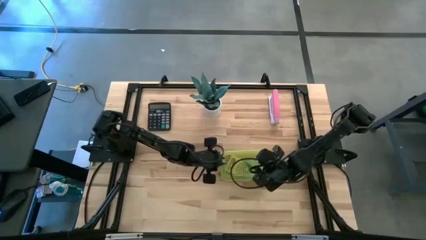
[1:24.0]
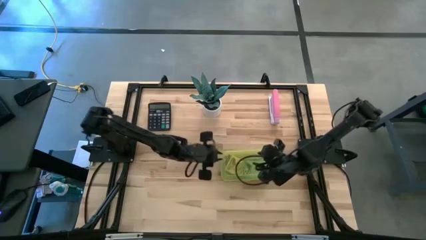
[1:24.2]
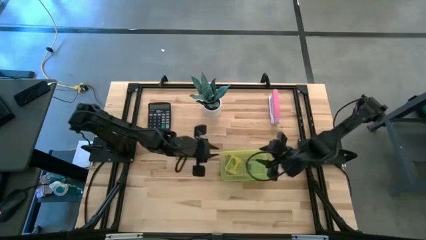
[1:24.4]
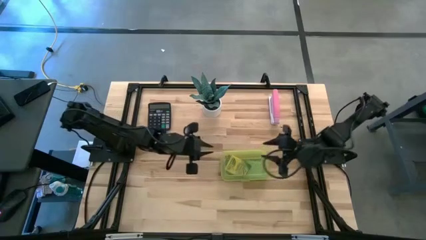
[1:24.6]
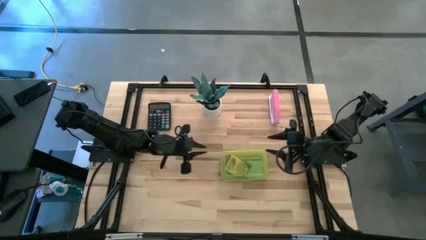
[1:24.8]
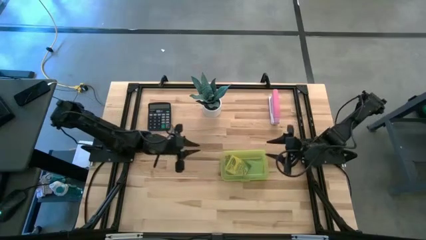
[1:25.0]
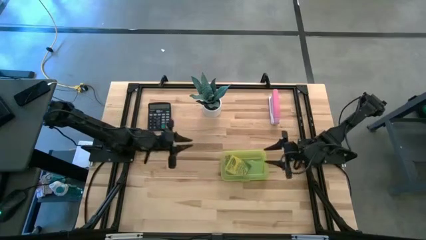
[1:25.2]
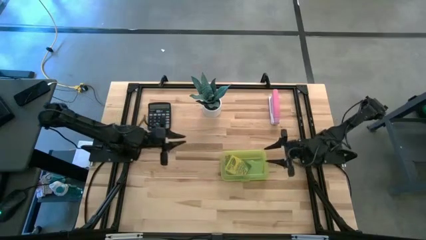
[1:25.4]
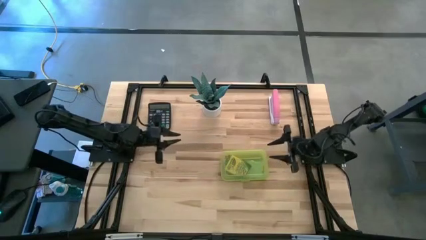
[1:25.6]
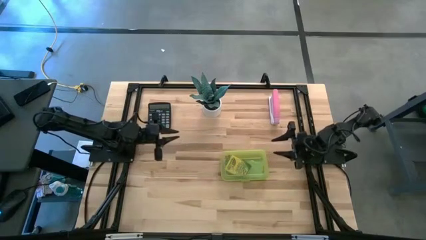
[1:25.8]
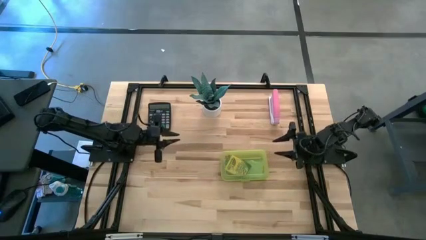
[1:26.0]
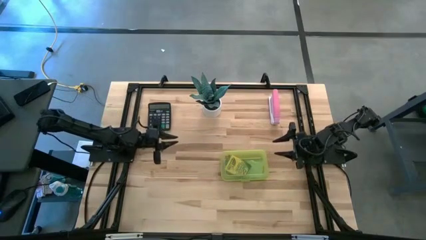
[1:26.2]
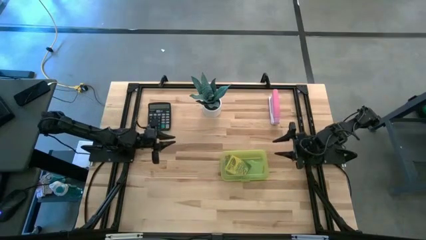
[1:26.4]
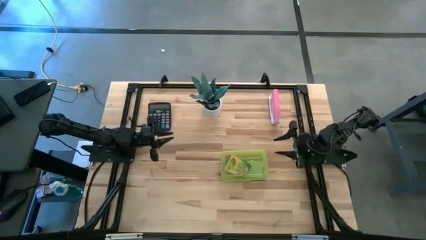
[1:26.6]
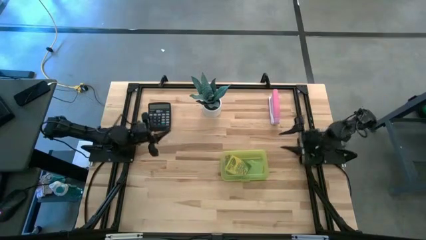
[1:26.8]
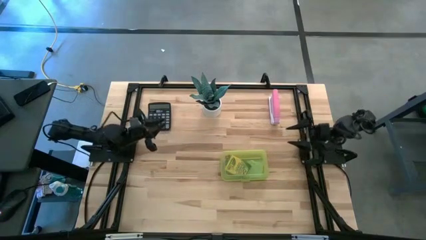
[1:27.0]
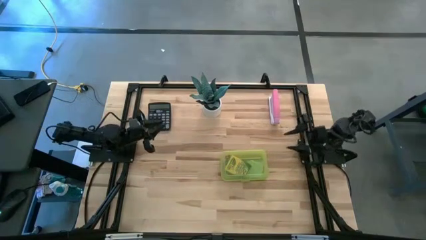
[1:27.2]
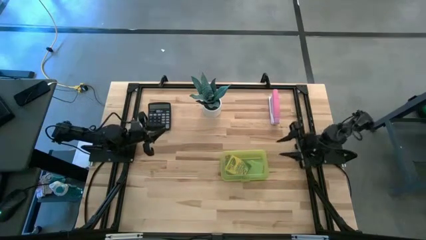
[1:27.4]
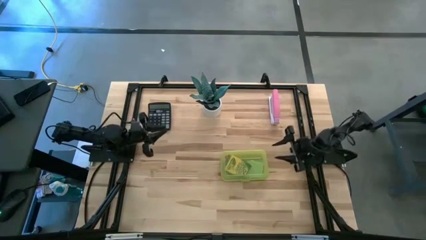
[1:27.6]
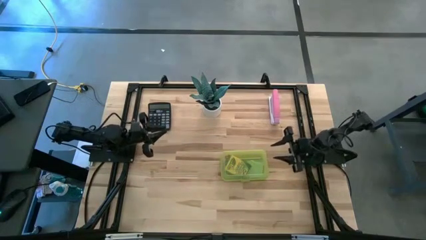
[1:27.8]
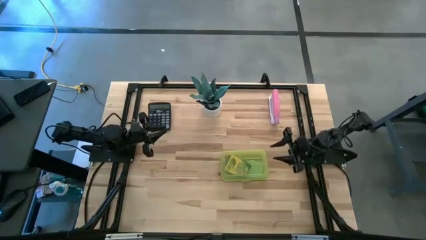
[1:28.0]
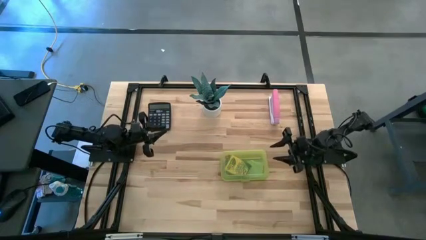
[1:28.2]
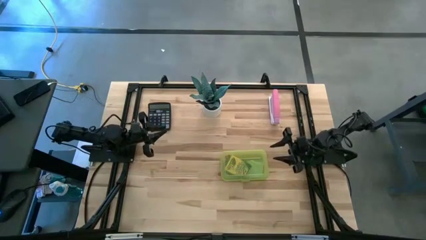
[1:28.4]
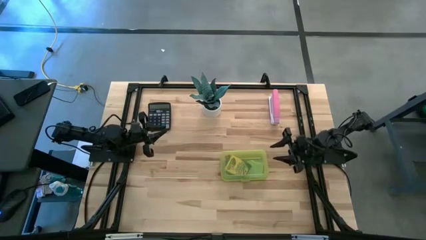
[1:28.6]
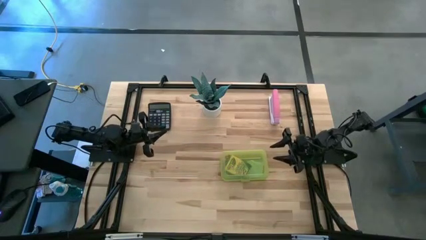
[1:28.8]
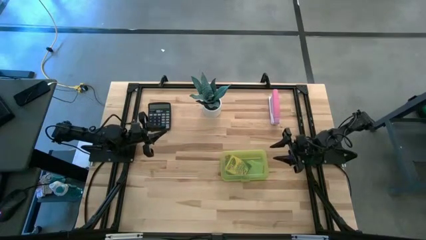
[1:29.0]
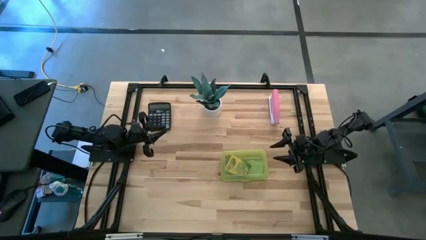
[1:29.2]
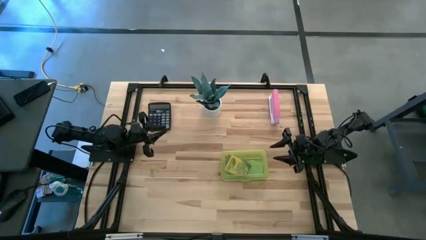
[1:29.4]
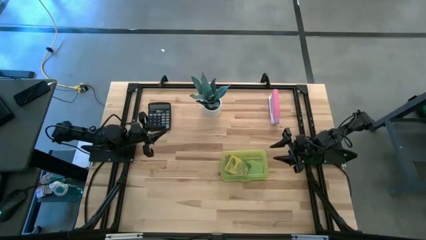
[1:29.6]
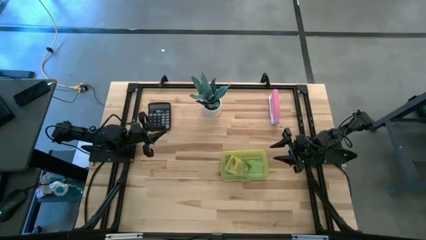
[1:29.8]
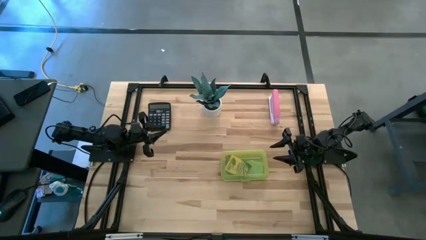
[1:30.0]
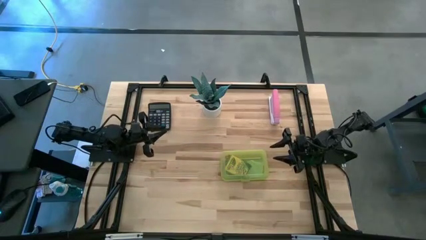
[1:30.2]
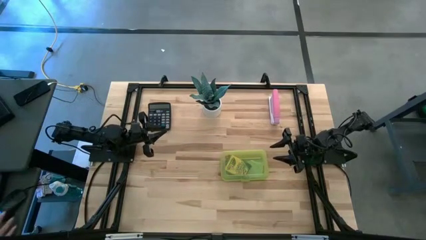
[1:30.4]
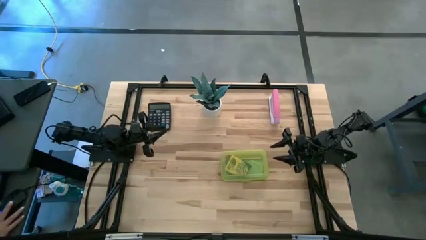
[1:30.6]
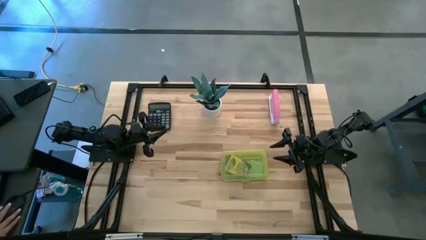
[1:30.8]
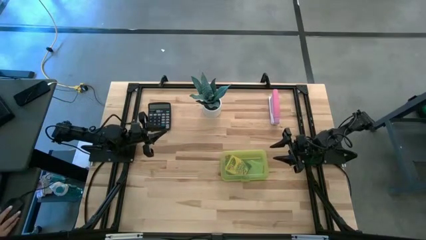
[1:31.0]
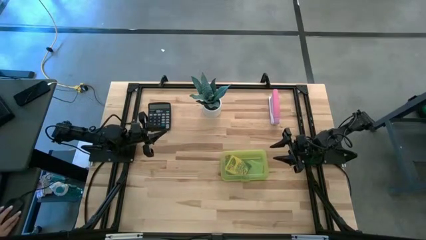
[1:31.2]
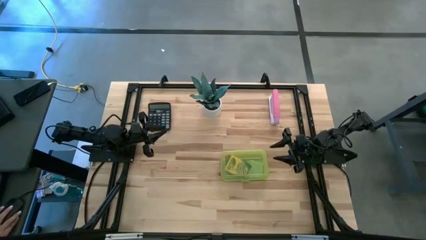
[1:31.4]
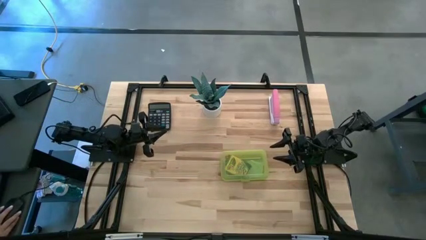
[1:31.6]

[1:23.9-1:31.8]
Task: Pack school essentials
Return to Home Position

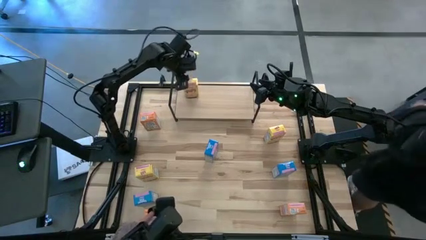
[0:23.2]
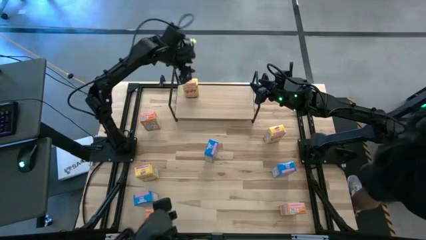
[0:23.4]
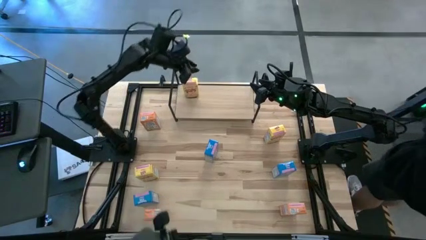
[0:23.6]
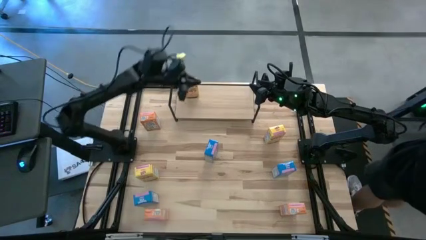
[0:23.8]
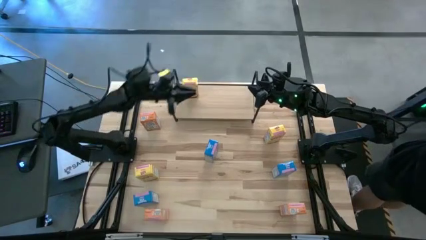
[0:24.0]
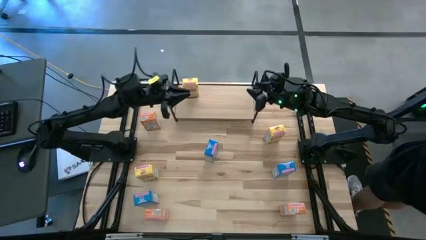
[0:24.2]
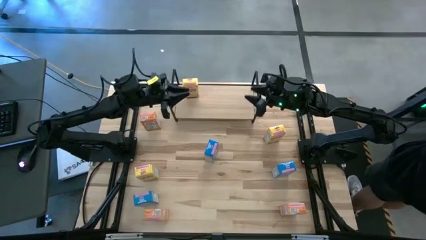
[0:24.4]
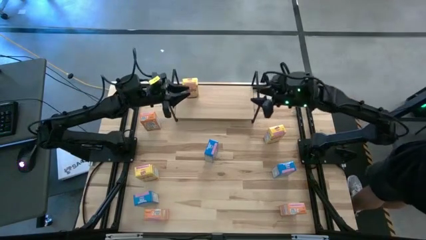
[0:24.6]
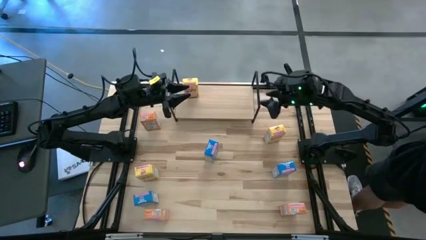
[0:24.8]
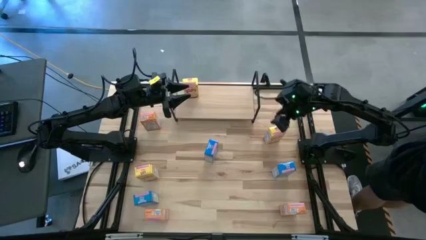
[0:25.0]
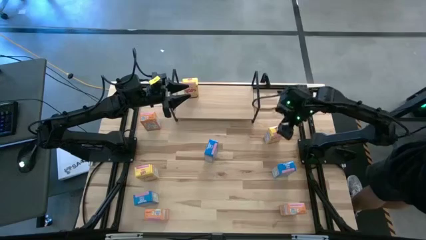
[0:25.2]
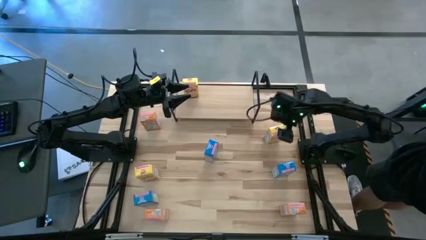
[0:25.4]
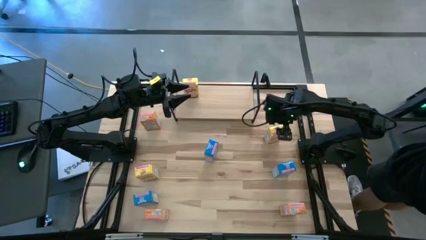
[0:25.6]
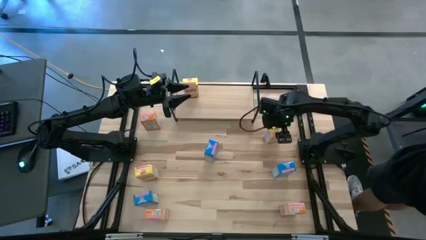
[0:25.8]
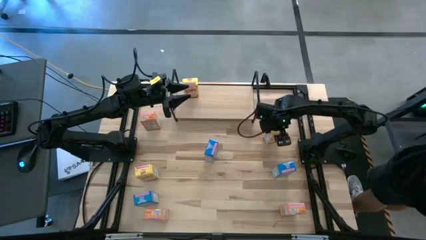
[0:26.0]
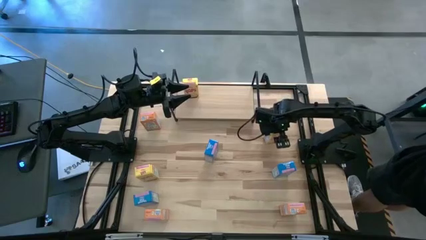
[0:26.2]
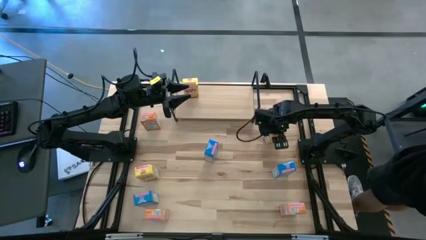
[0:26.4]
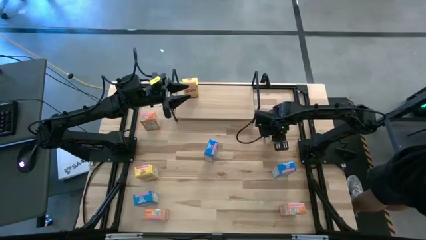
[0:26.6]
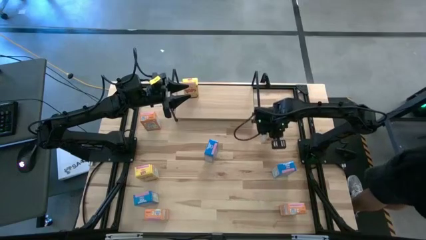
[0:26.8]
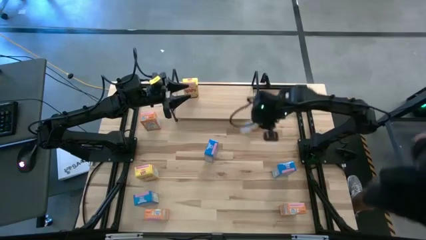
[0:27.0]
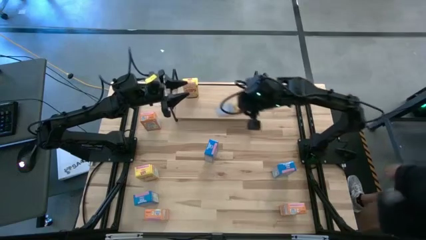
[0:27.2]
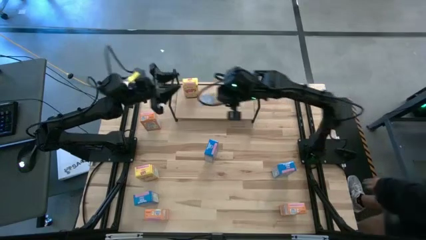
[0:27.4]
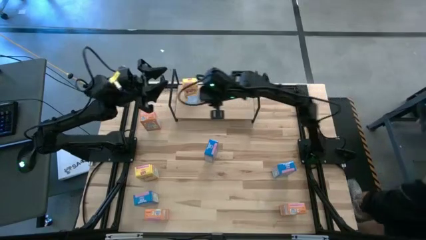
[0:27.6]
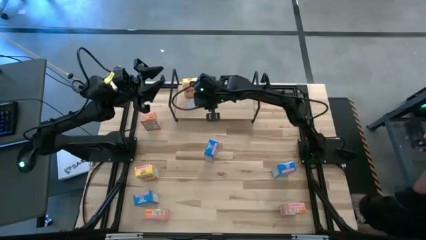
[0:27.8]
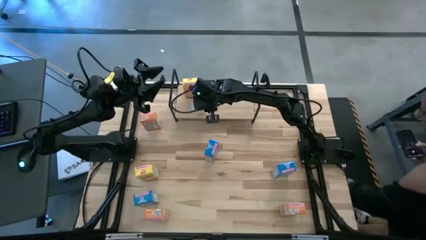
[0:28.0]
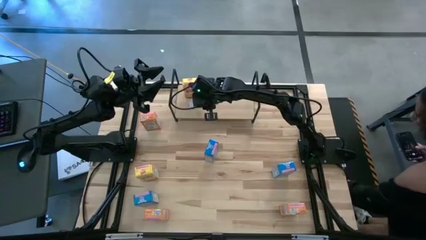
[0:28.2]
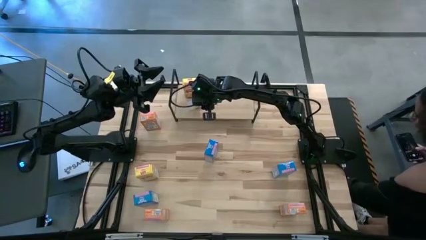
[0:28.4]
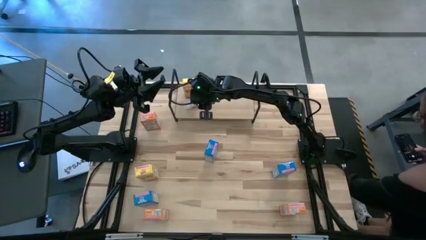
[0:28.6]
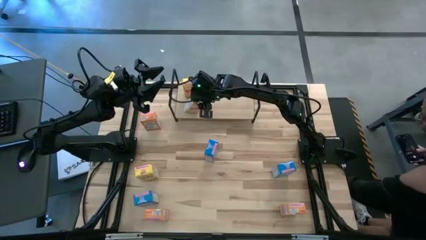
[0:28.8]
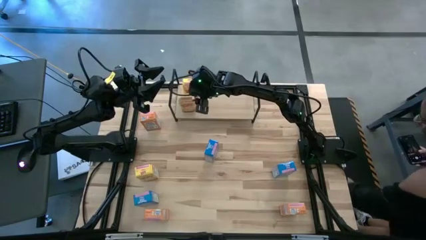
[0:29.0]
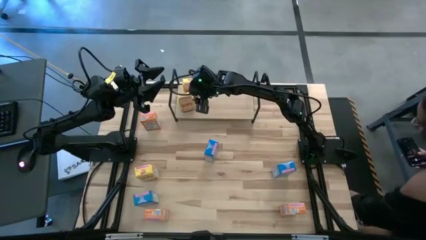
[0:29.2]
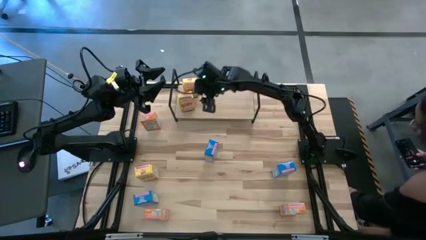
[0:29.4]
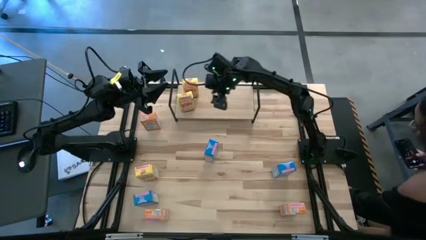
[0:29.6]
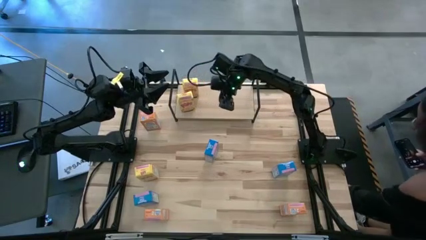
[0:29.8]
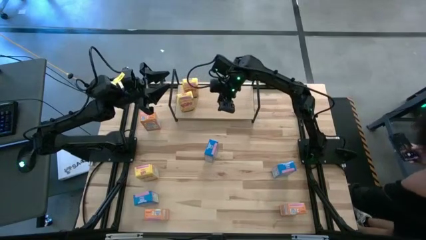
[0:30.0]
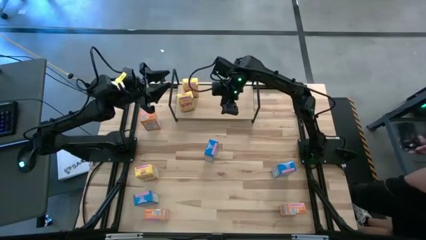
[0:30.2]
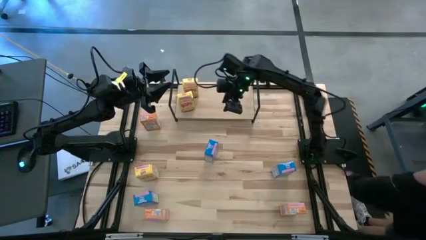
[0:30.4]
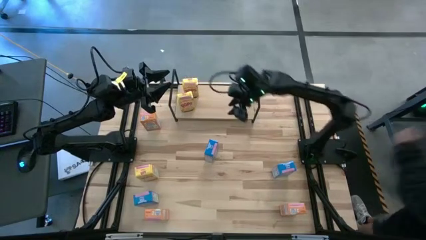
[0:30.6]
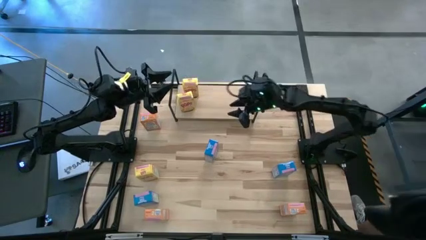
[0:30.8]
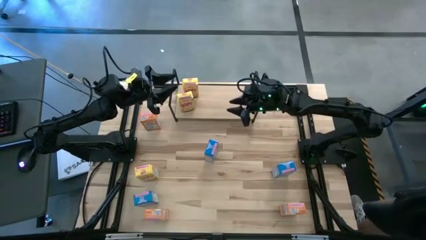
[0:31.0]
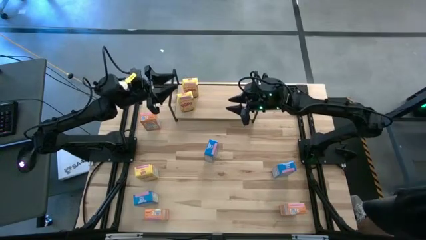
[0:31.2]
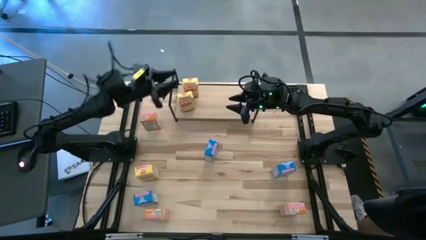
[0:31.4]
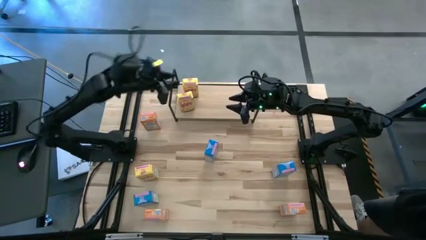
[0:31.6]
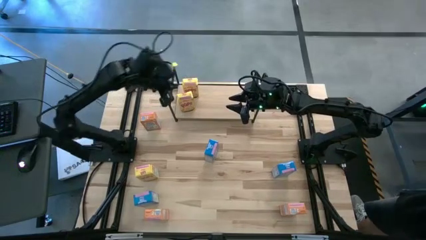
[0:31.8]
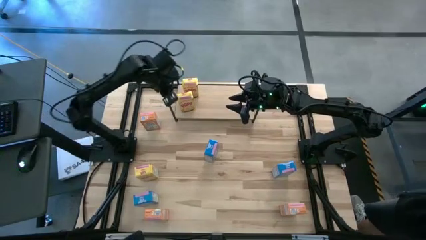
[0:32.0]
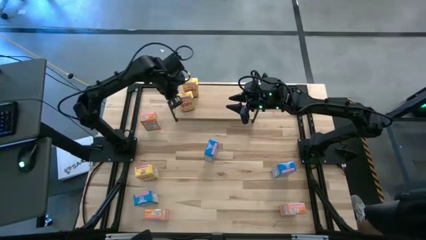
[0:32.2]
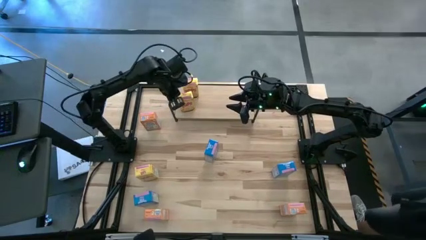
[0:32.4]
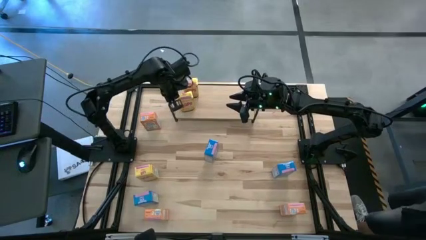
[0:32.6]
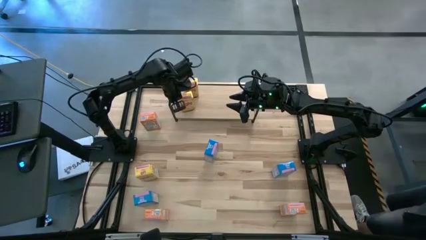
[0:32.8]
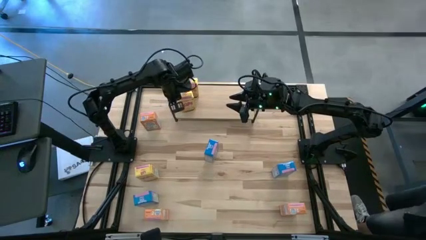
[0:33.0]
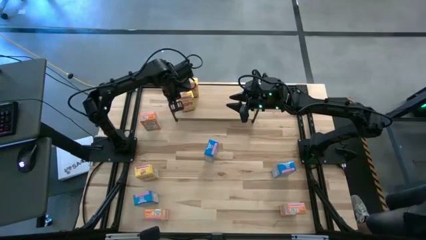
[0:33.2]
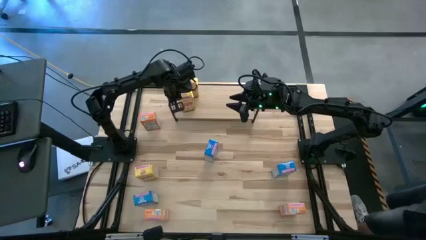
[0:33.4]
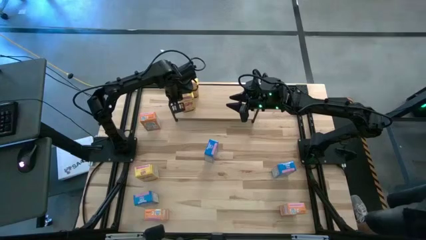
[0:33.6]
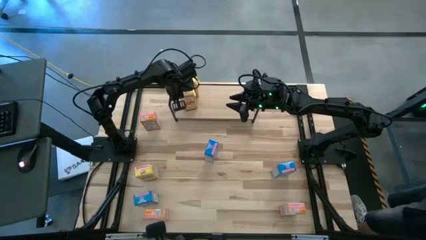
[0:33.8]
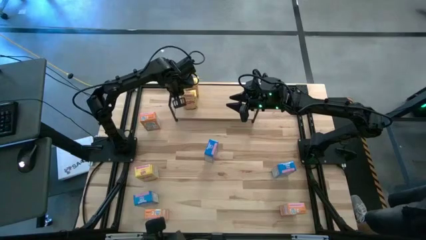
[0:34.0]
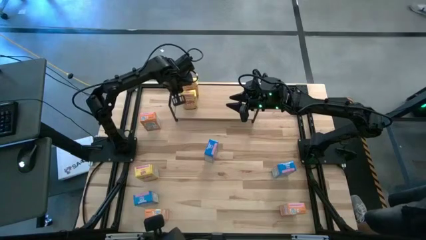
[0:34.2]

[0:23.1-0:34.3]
Task: Stack cereal on shelf
Put the top right yellow cereal box on the shelf aligned with the other yellow cereal box
